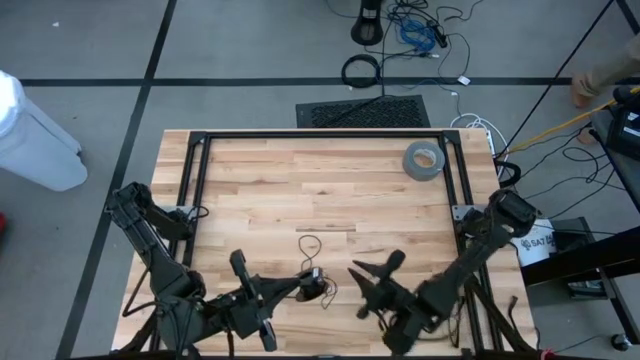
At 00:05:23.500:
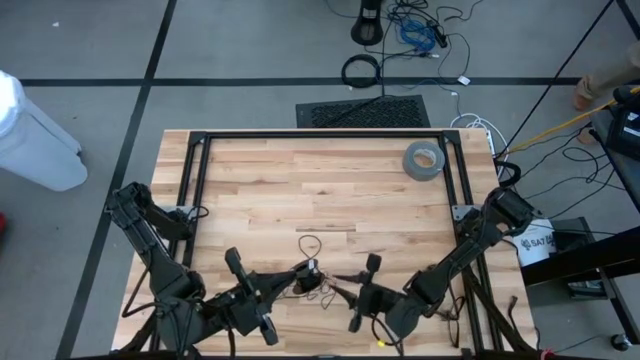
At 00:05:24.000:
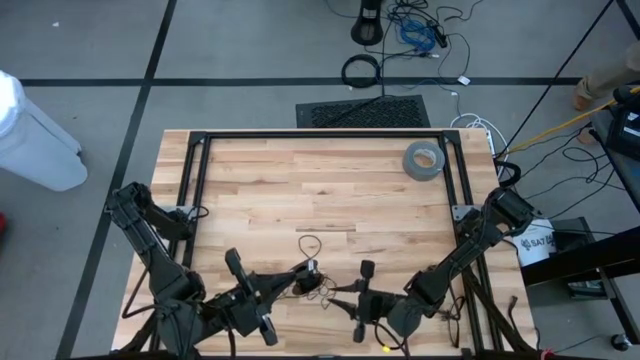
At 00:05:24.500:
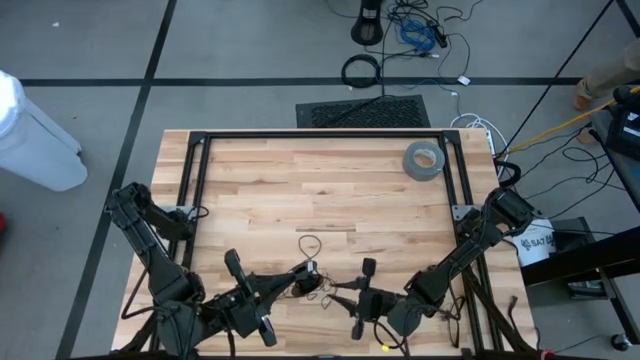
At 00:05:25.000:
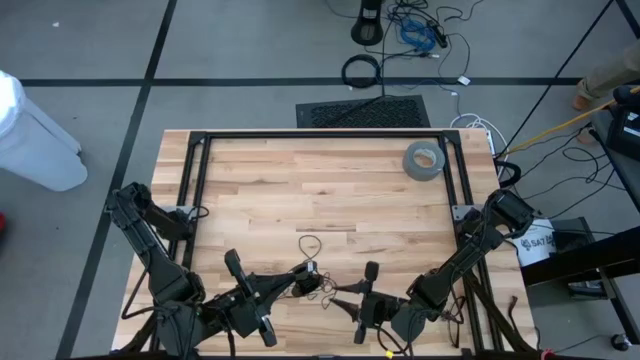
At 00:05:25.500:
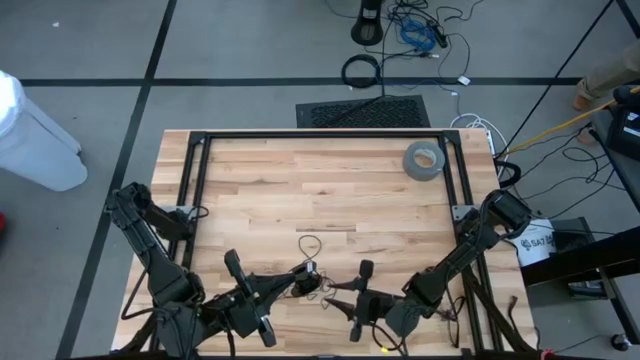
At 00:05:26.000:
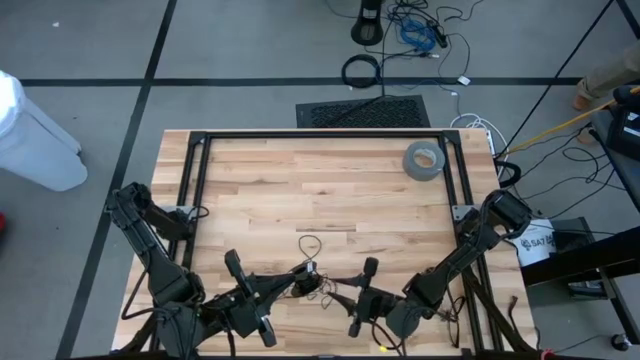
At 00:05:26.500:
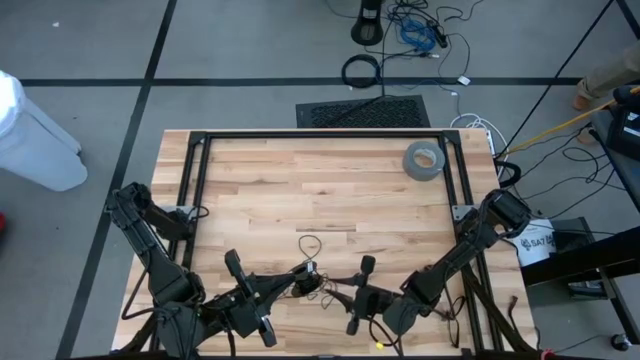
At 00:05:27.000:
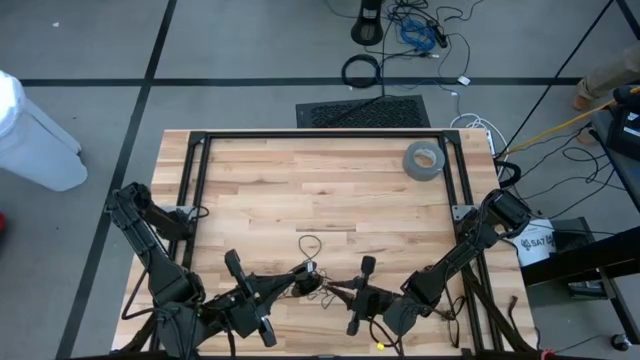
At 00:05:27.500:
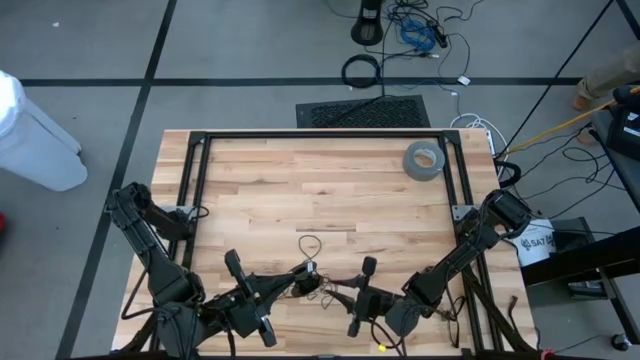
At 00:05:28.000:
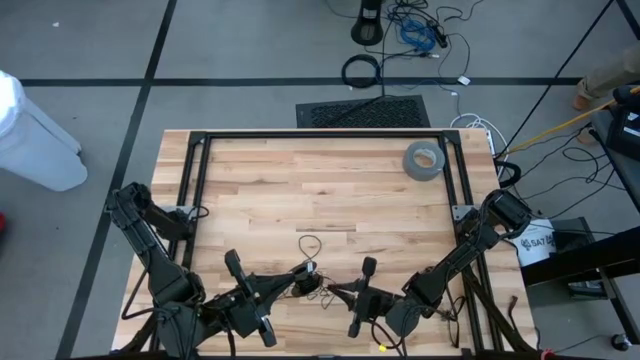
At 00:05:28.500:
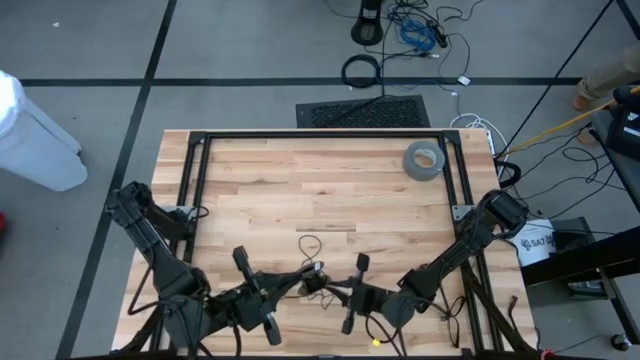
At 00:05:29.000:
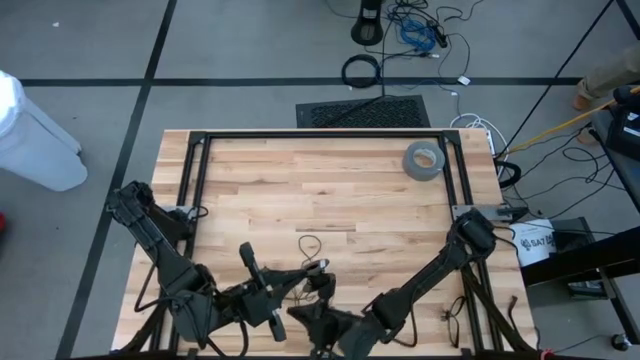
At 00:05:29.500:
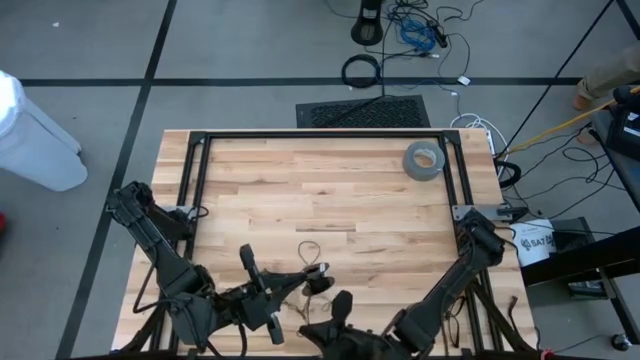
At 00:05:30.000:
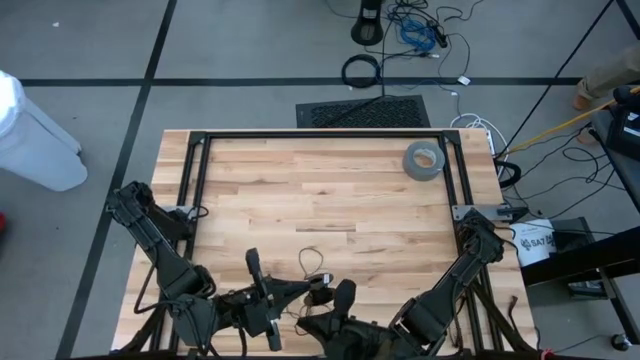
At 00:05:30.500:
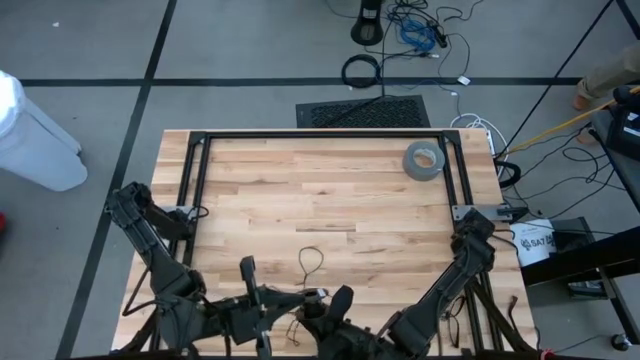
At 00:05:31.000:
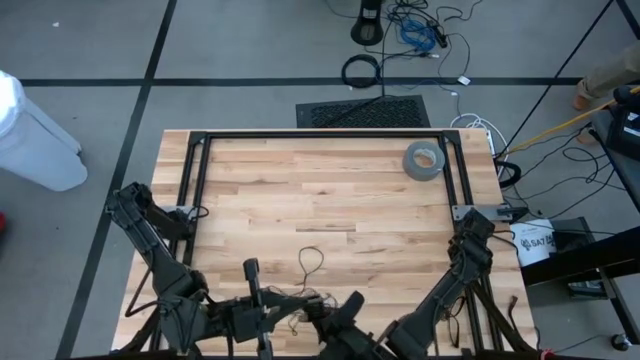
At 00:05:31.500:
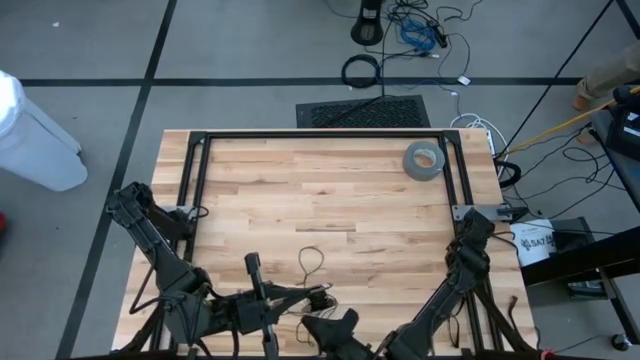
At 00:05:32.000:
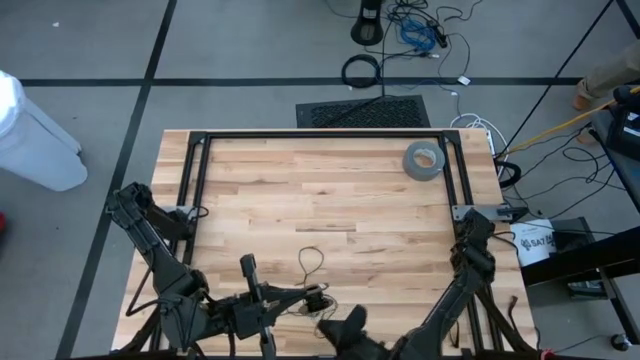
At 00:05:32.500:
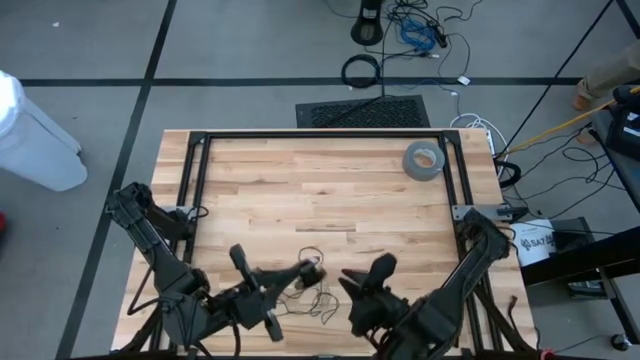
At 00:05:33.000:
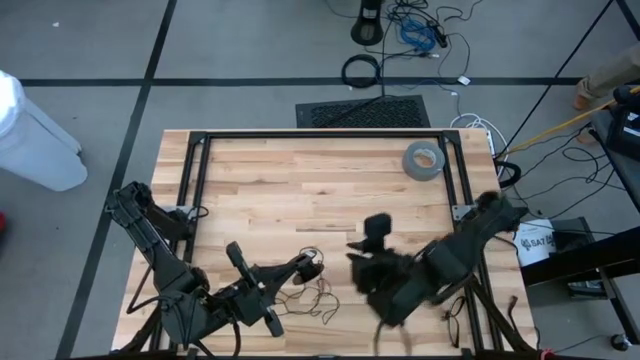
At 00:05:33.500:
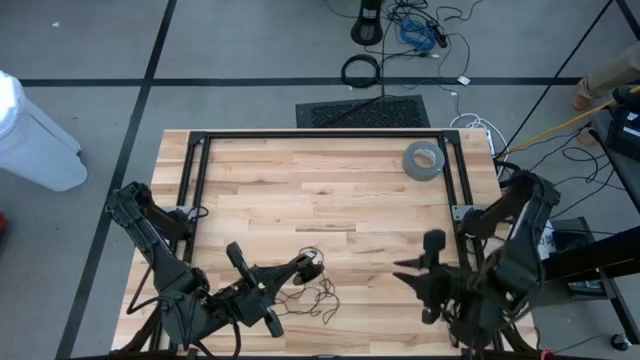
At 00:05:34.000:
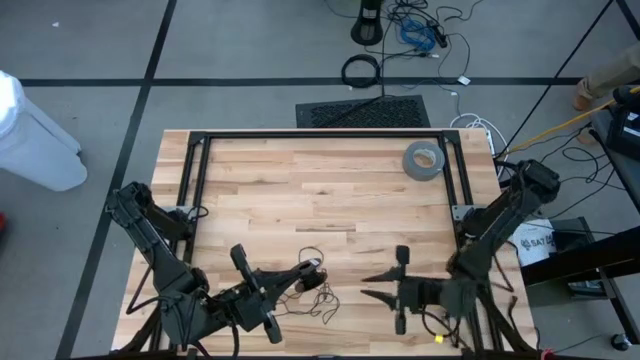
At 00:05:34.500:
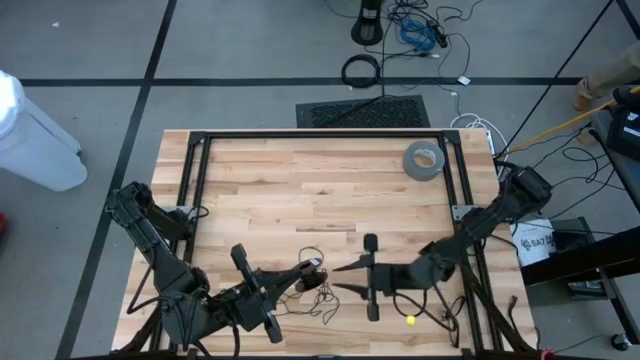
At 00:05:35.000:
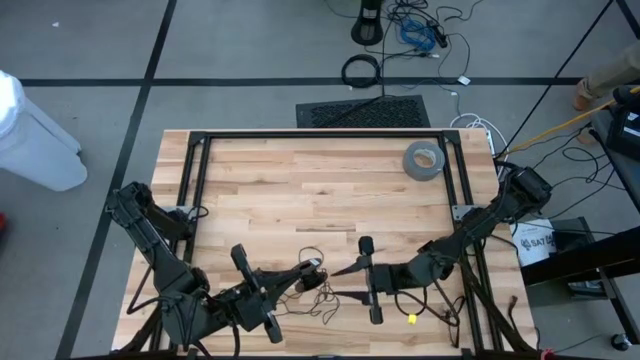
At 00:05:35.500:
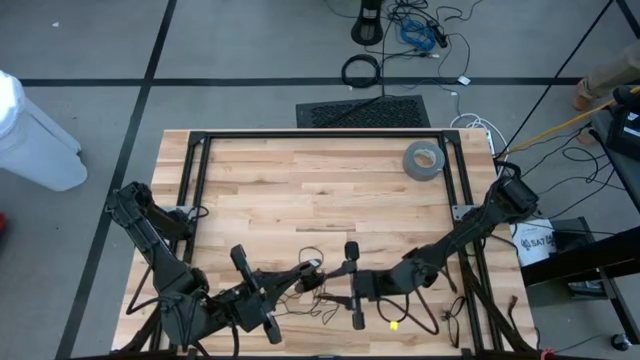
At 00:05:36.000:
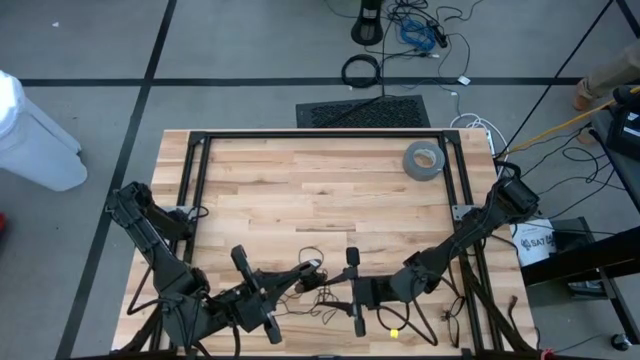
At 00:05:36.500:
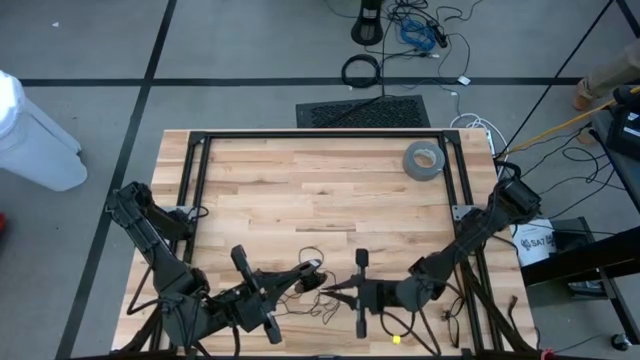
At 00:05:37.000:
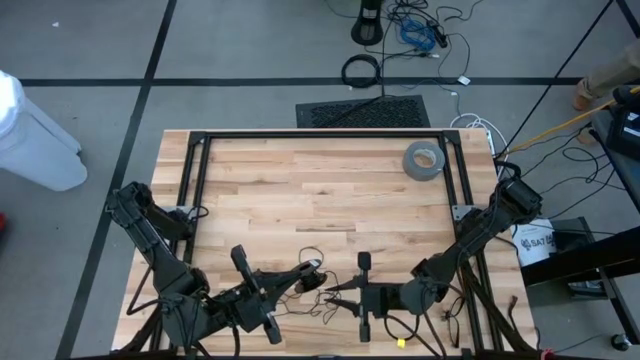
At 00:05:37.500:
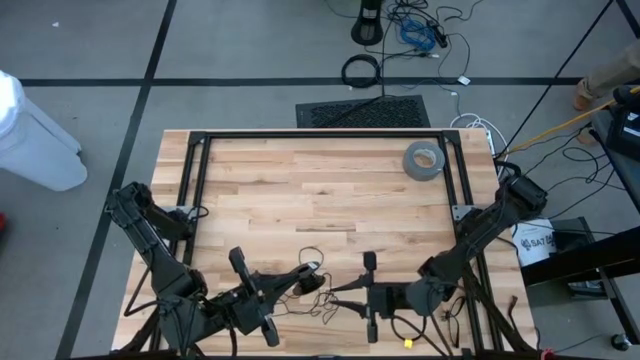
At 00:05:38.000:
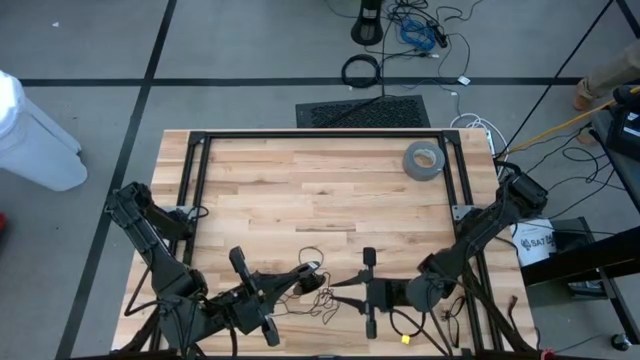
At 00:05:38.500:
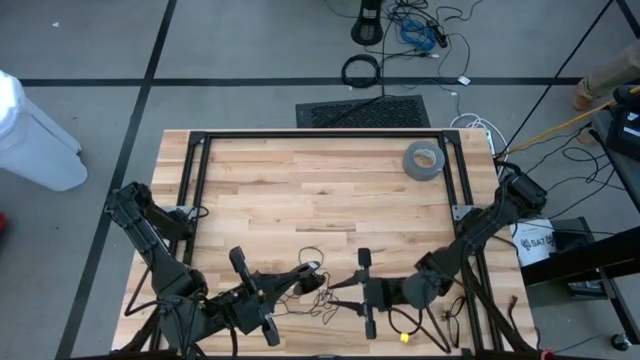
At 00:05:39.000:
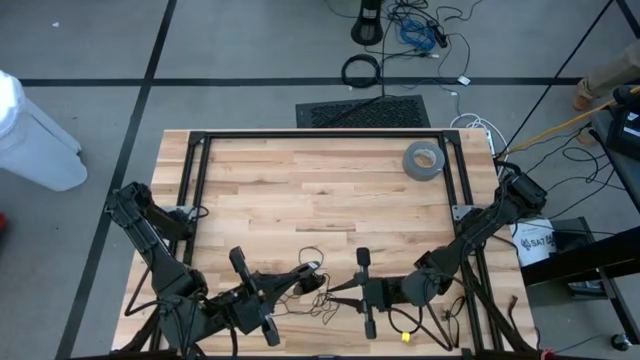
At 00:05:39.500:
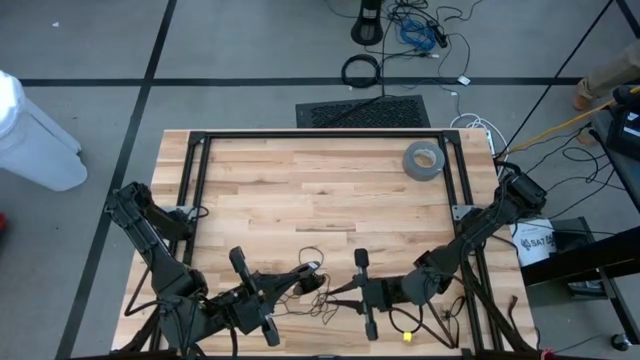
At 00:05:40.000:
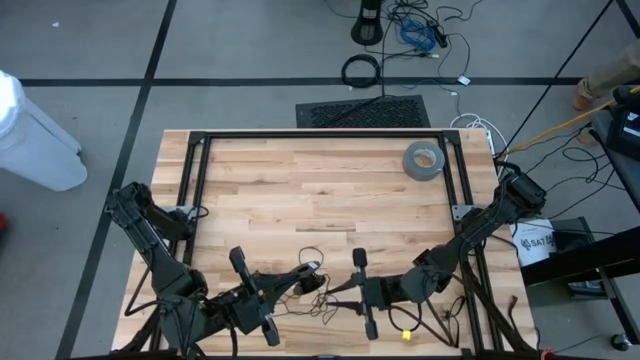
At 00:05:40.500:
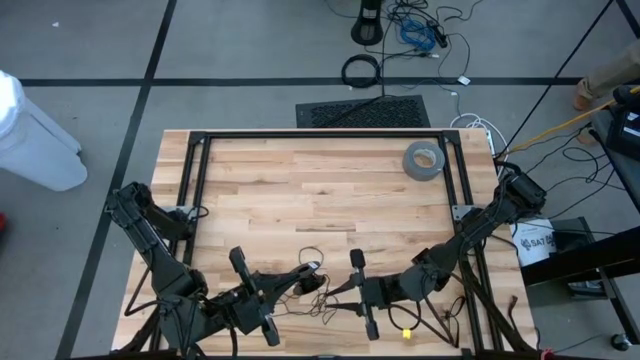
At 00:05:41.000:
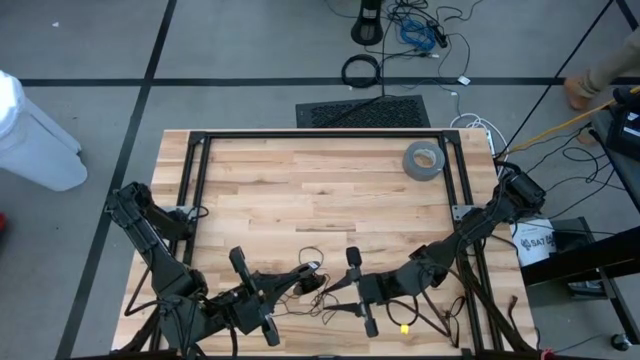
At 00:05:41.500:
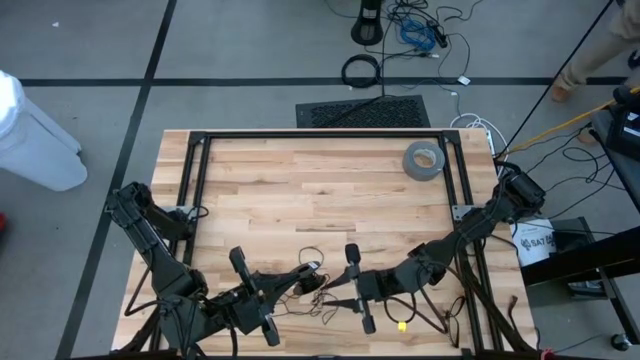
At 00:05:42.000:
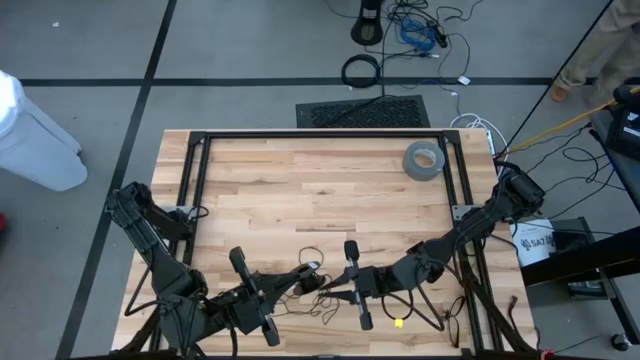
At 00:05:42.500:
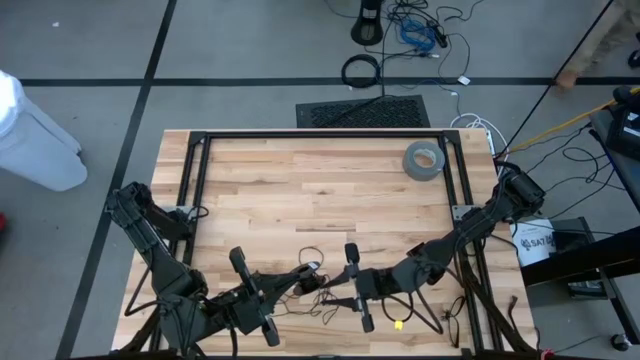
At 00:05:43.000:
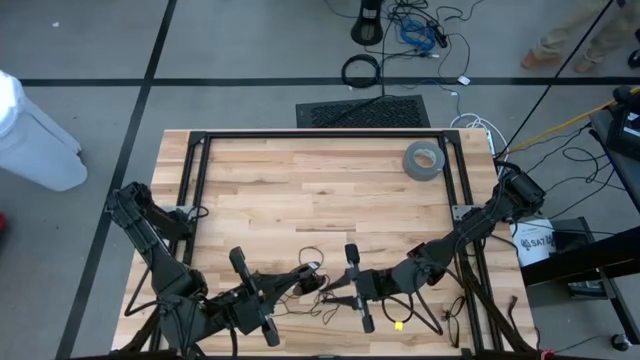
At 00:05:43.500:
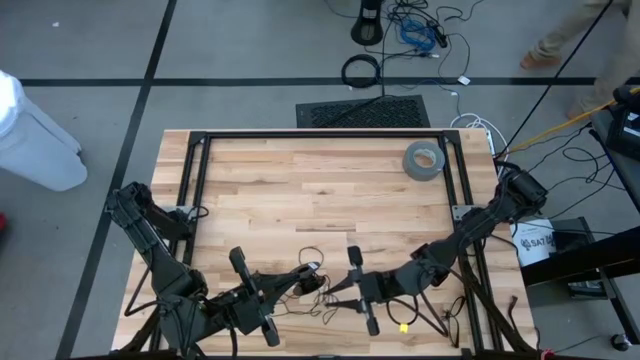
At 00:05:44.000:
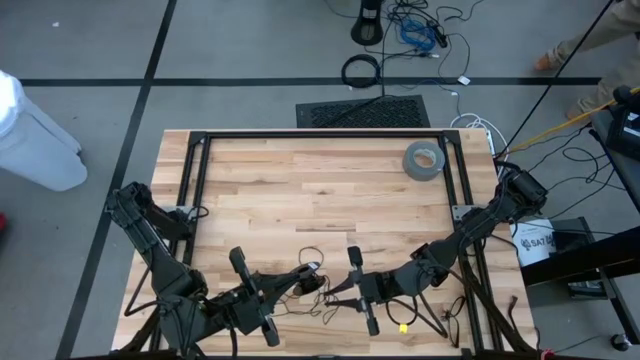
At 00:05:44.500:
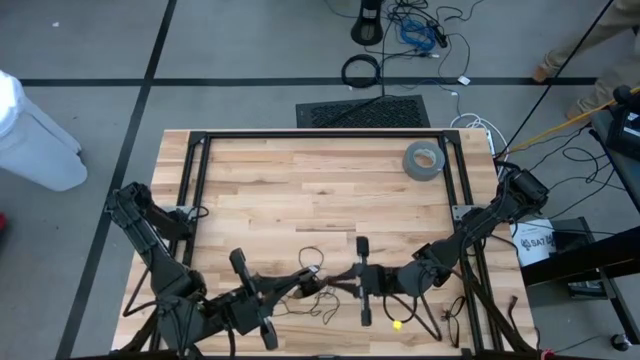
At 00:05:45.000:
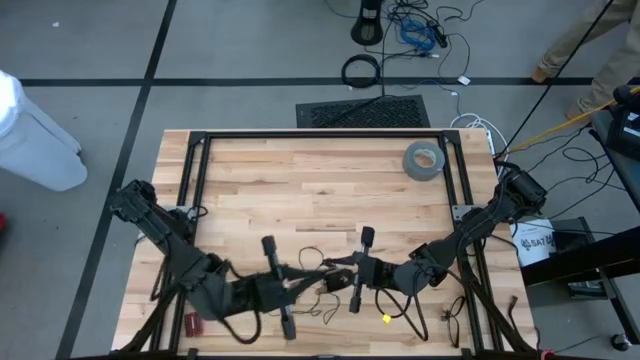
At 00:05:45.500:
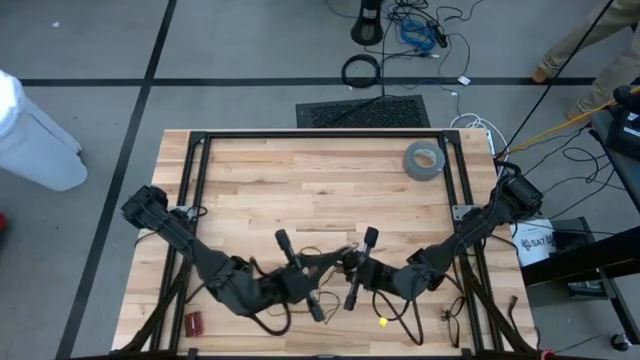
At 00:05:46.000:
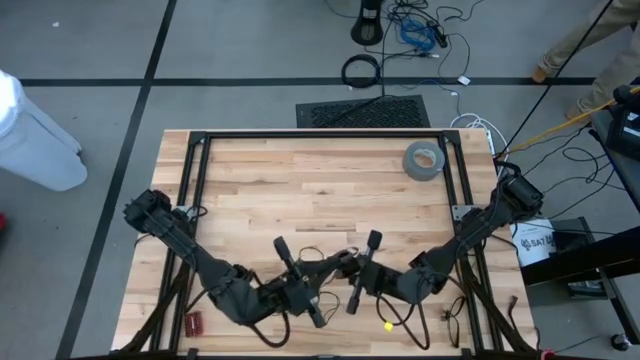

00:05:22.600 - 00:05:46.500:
Task: Coil cords
Coil the black wire onto the spool
